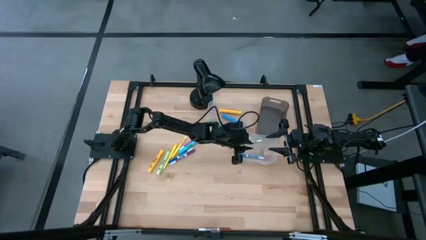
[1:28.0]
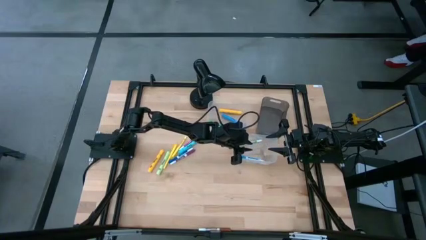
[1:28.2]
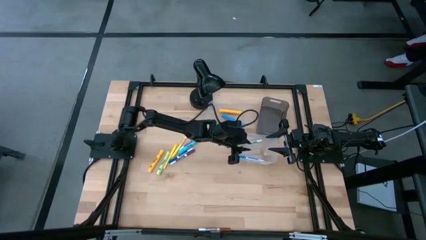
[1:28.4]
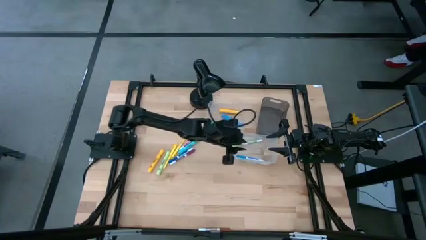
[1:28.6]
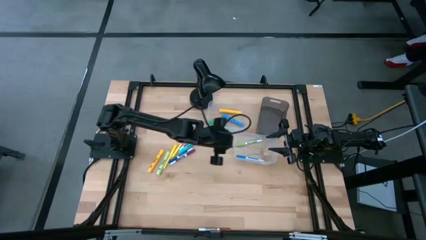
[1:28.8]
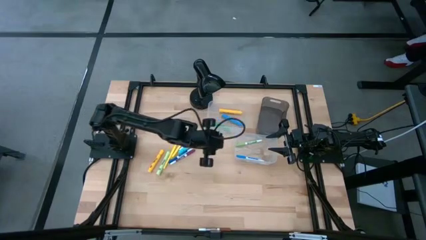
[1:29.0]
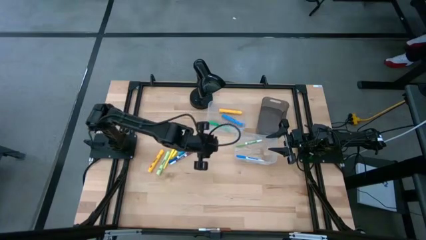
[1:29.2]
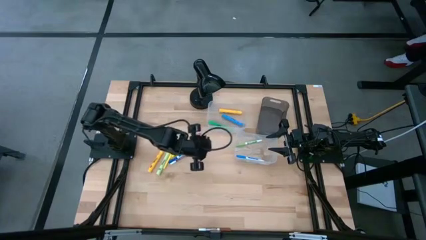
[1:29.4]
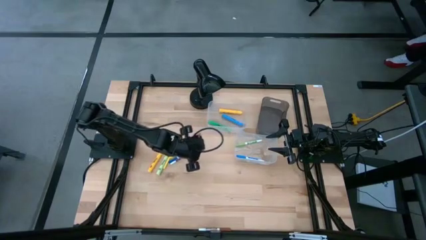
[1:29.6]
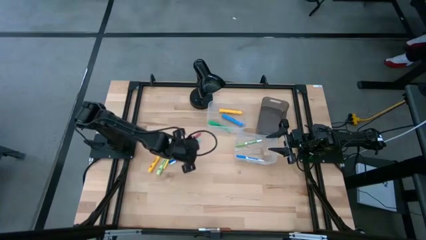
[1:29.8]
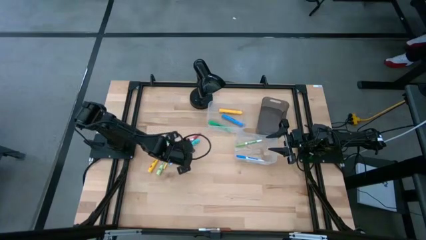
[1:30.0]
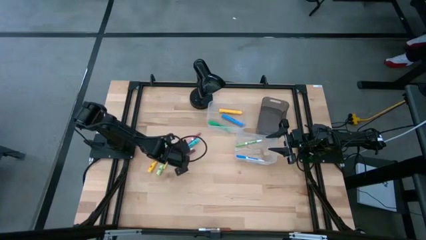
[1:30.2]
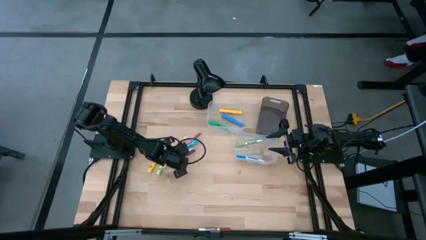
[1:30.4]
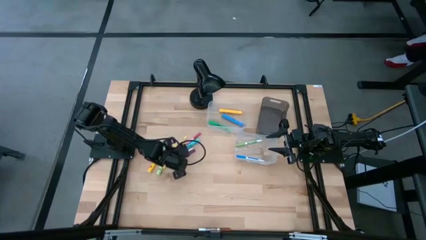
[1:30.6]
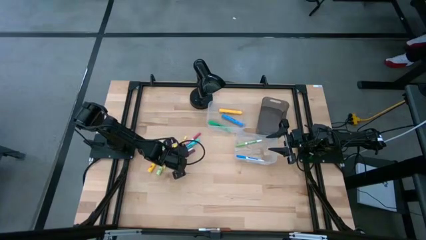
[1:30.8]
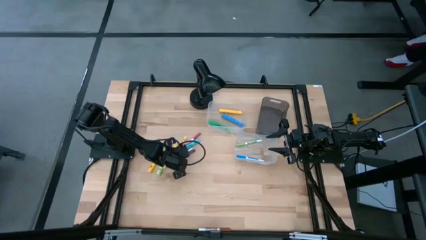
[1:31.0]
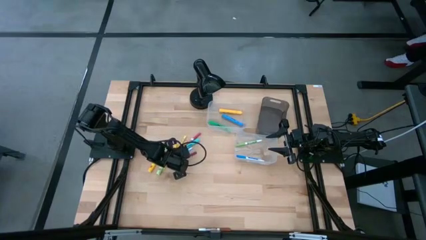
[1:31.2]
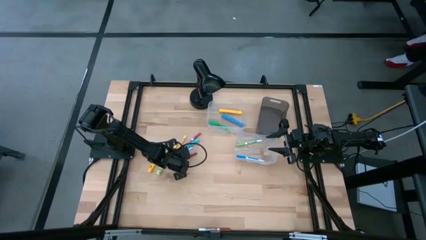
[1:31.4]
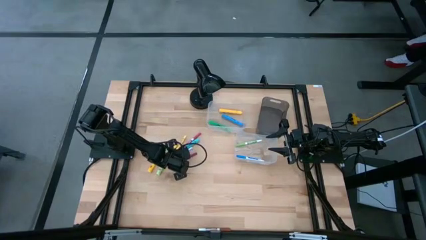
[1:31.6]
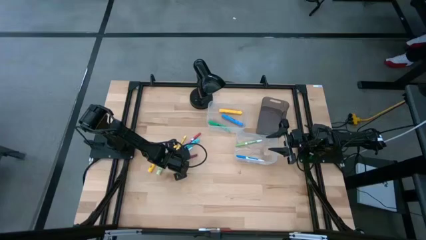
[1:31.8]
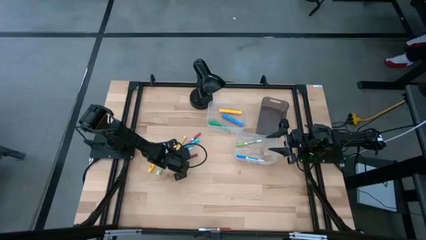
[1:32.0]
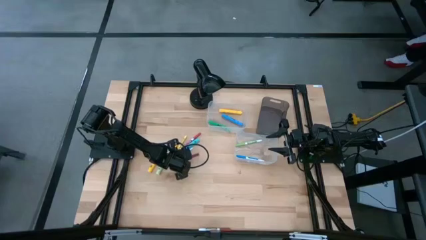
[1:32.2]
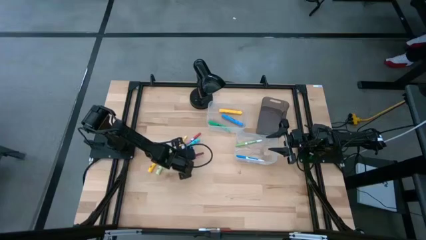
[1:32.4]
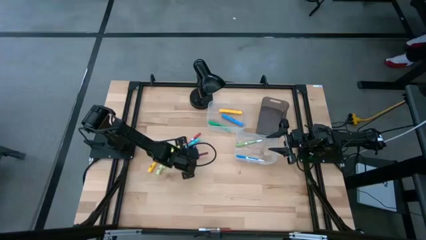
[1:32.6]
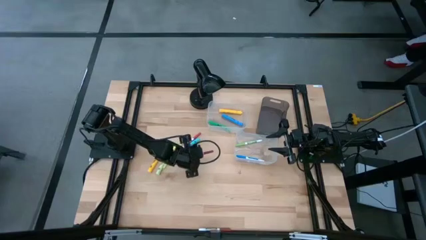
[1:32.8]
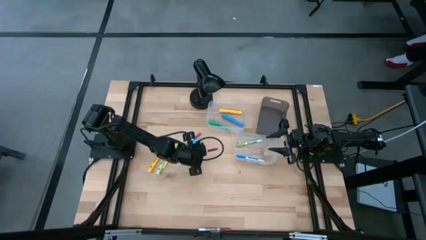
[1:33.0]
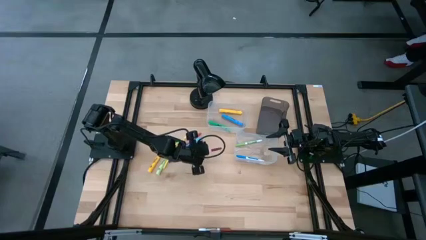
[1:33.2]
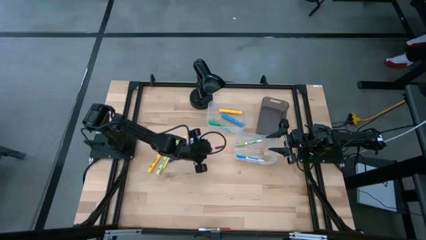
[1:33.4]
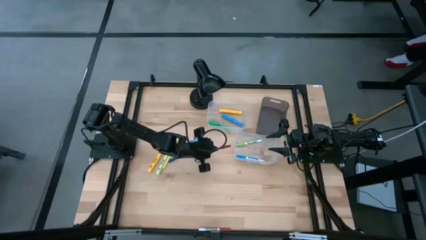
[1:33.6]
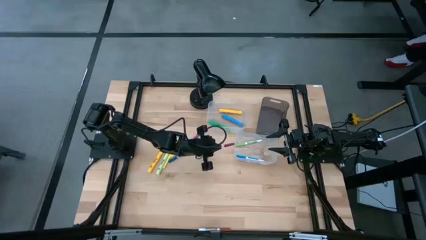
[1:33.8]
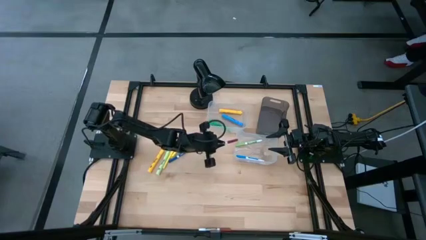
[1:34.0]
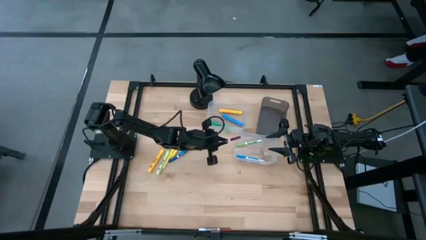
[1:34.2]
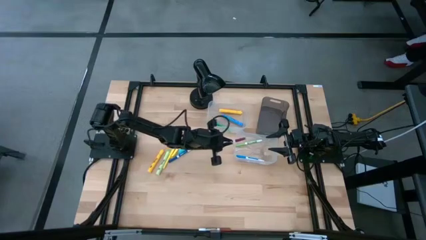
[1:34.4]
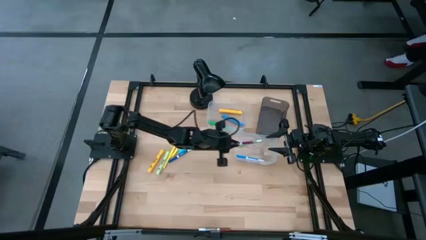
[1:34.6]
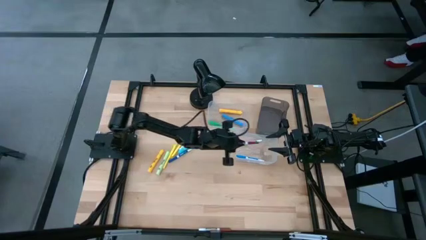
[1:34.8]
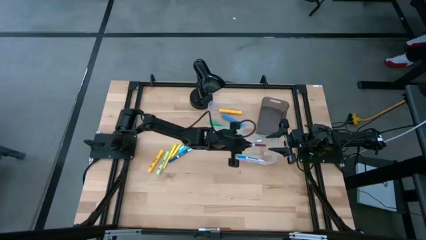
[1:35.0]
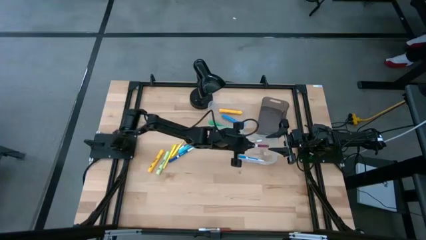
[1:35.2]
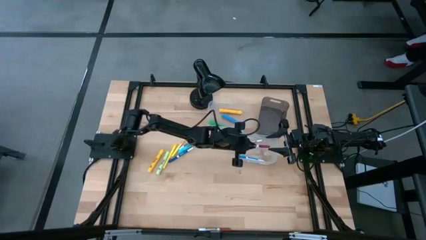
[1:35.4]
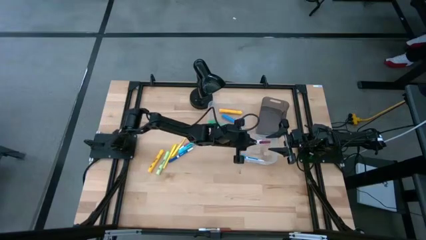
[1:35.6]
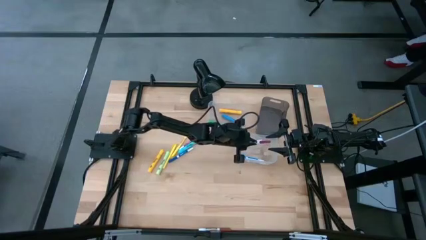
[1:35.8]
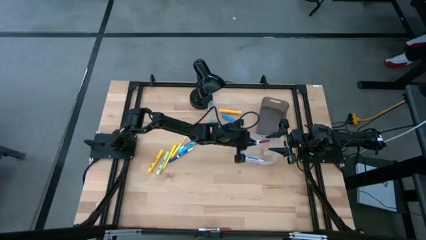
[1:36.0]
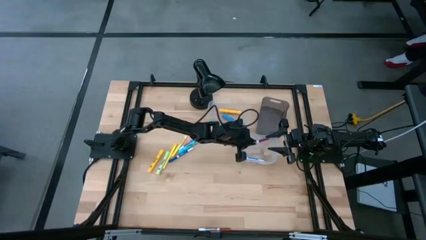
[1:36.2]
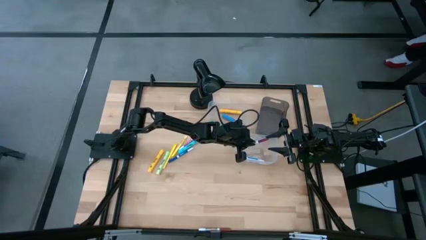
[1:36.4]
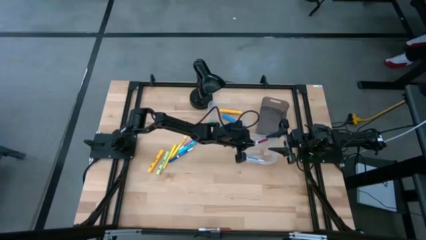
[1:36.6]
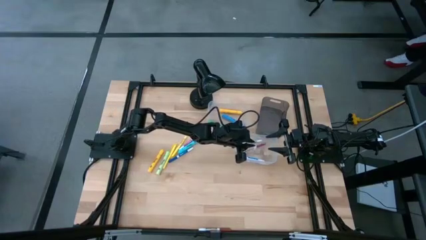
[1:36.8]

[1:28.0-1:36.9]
Task: Pick & Place Markers
Put the dark pink marker pen into the bottom transparent bin

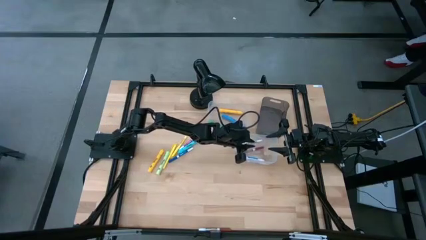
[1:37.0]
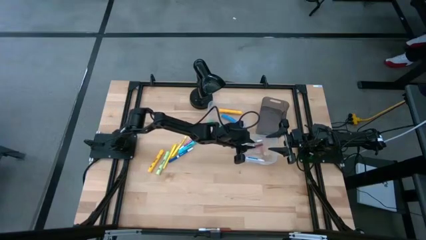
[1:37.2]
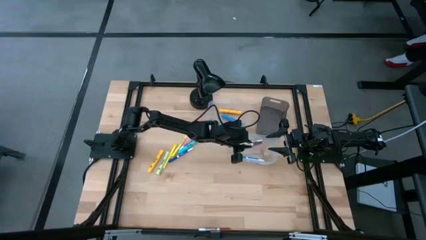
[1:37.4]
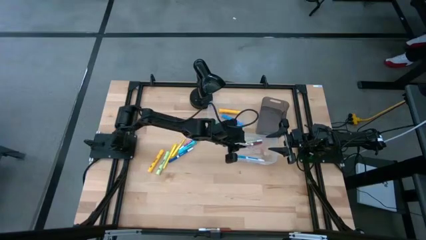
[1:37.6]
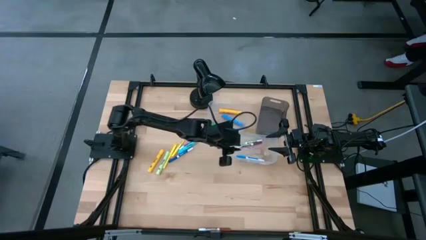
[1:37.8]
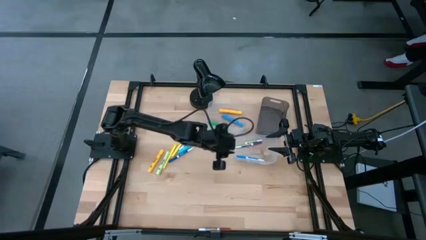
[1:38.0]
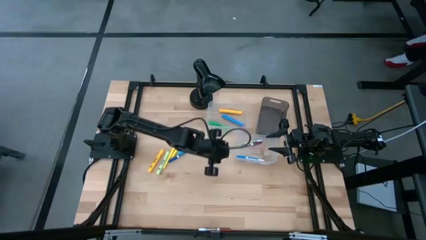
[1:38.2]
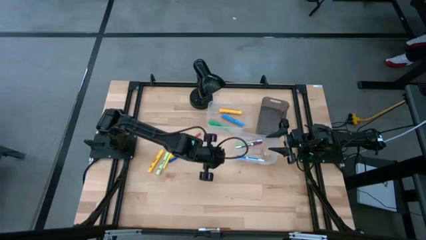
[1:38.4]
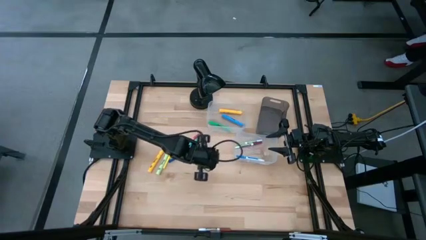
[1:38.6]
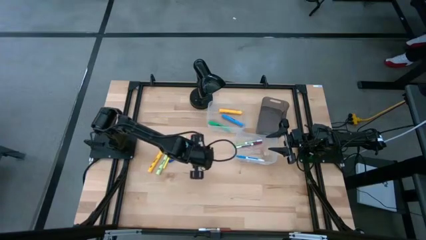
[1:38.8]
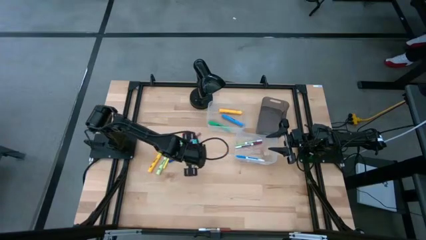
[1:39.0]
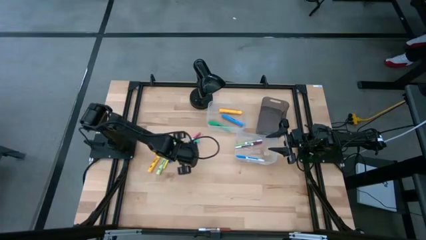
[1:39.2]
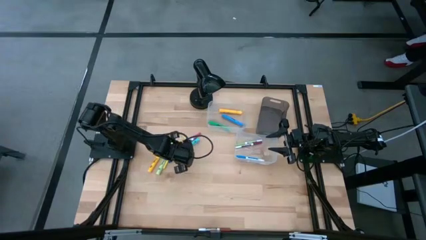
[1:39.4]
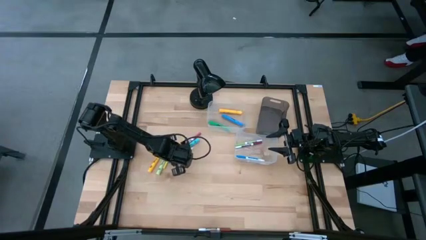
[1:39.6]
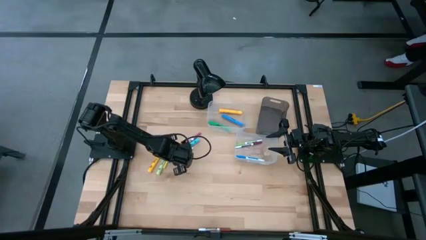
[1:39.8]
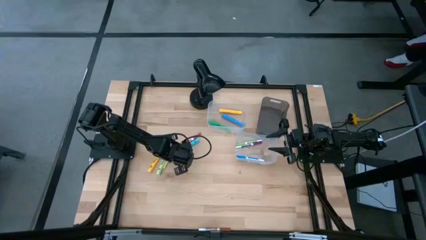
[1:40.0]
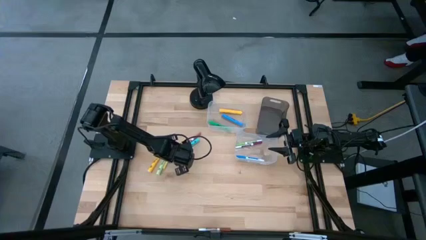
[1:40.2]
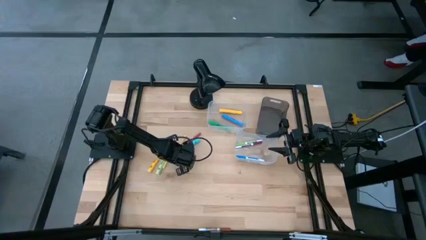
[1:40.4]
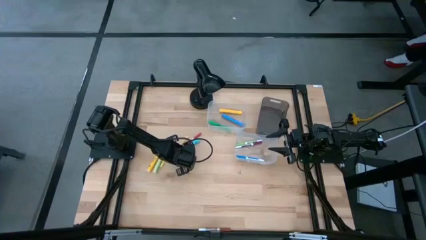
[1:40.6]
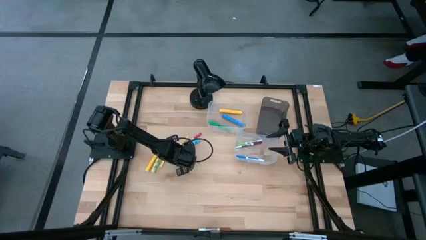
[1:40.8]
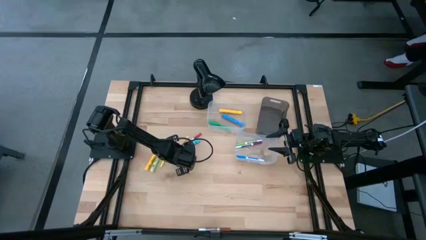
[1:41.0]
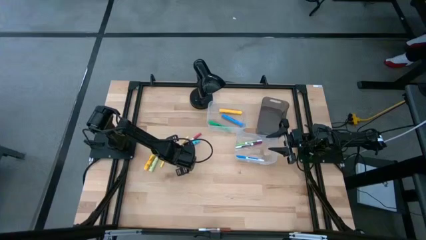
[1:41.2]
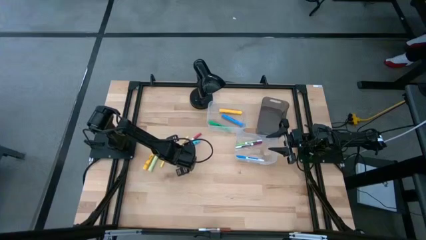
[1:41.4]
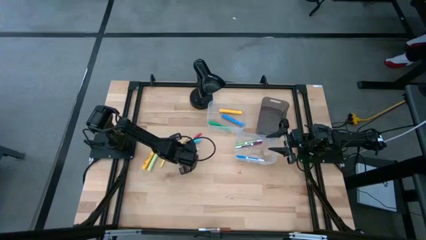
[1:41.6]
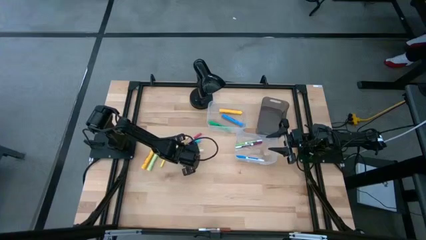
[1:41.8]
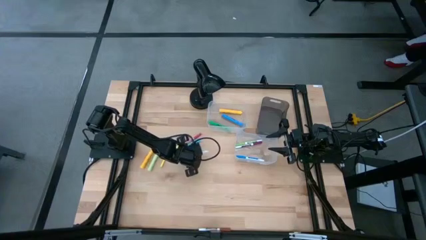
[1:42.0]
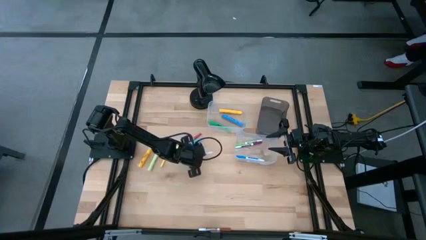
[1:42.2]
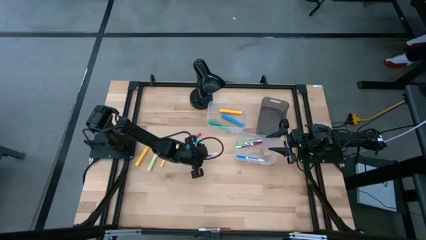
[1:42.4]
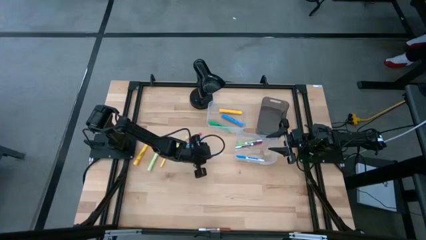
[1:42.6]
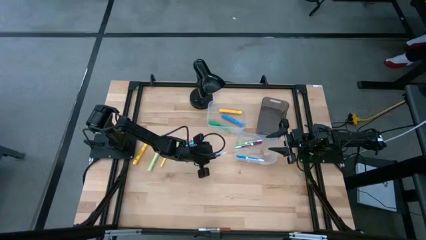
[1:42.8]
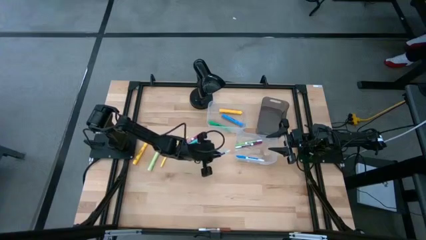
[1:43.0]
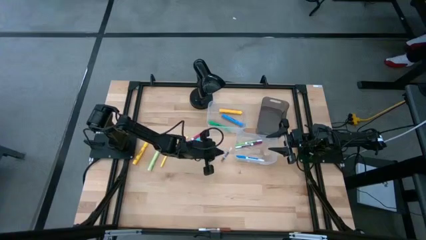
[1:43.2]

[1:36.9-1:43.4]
Put the blue marker pen into the bottom transparent bin
